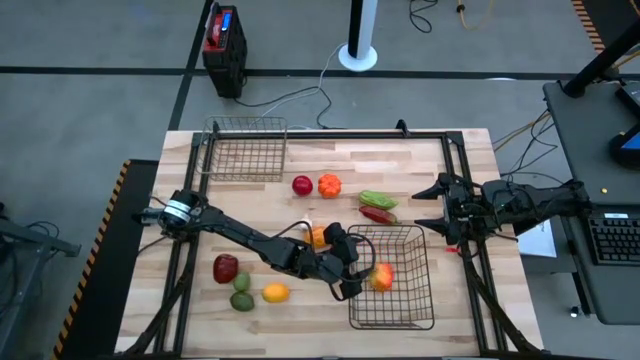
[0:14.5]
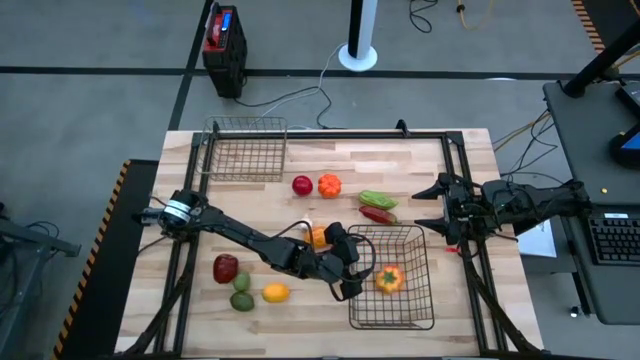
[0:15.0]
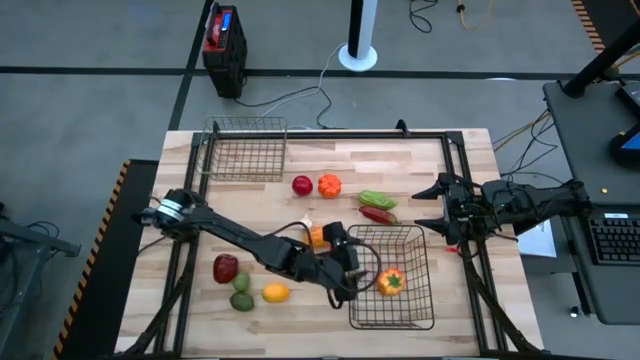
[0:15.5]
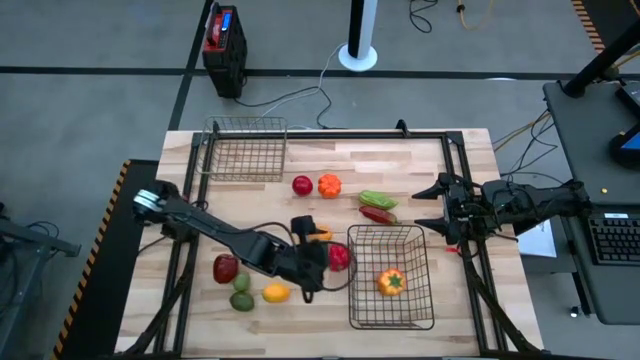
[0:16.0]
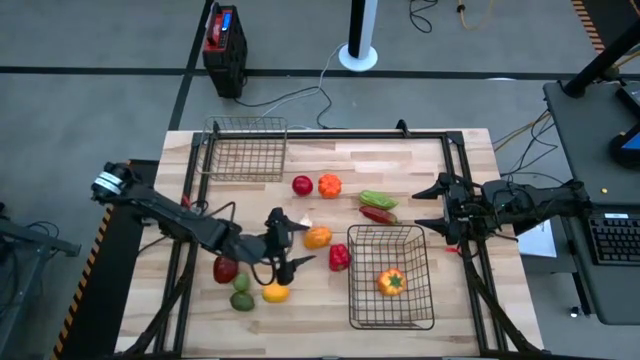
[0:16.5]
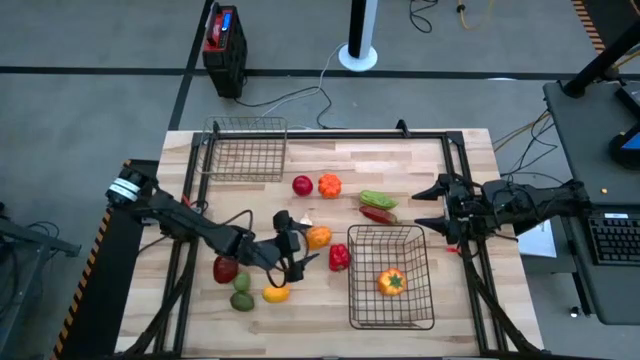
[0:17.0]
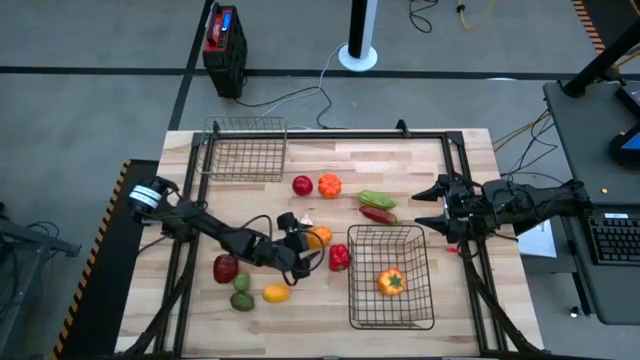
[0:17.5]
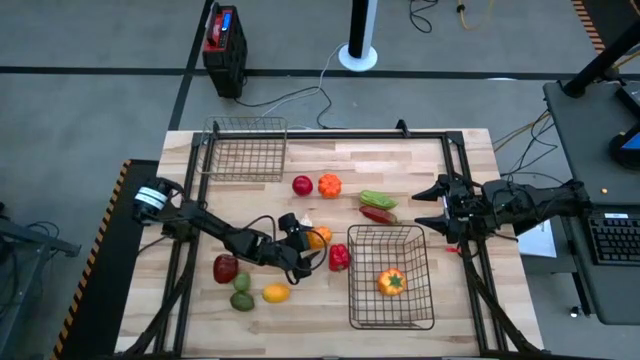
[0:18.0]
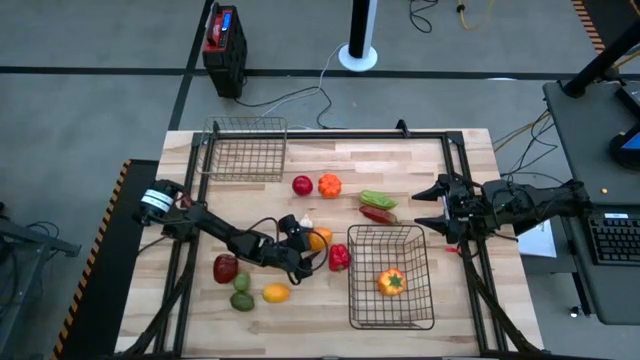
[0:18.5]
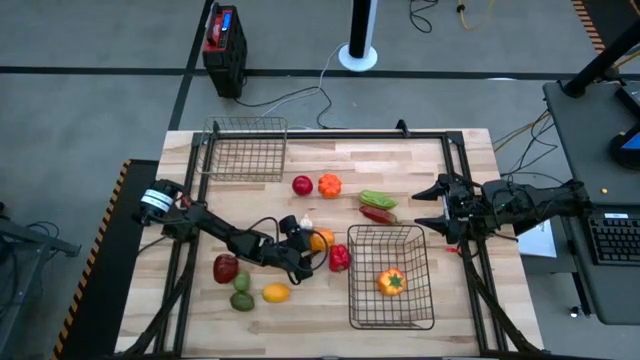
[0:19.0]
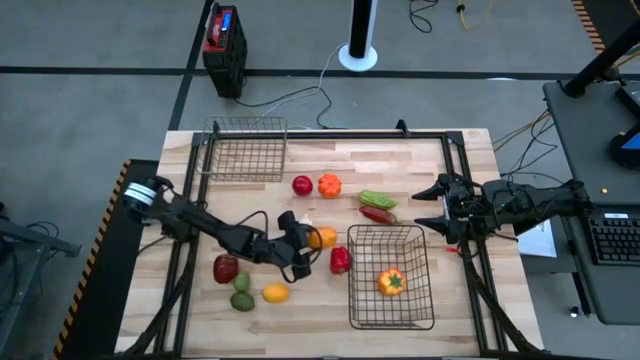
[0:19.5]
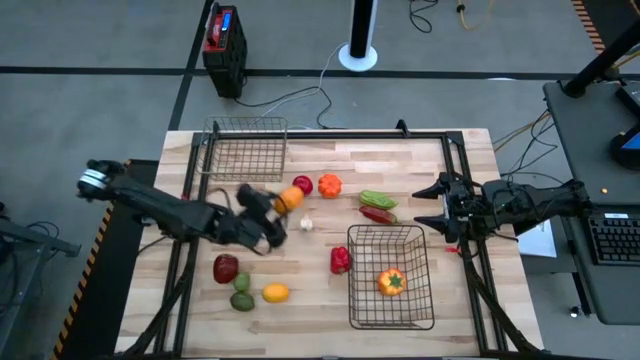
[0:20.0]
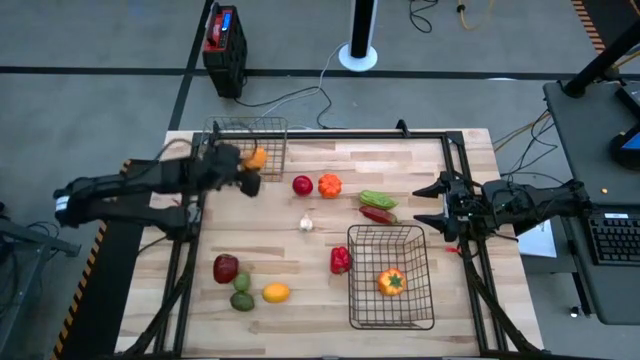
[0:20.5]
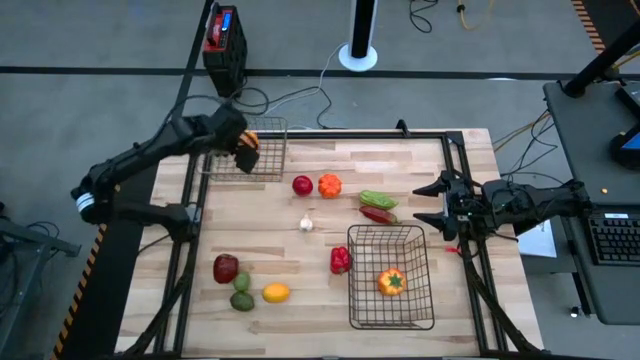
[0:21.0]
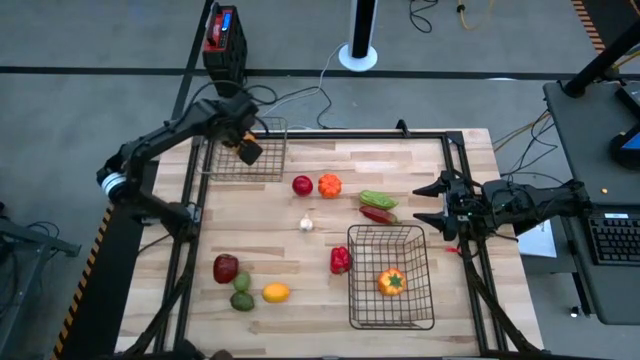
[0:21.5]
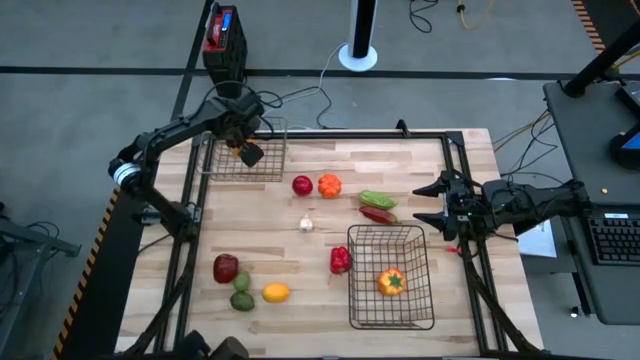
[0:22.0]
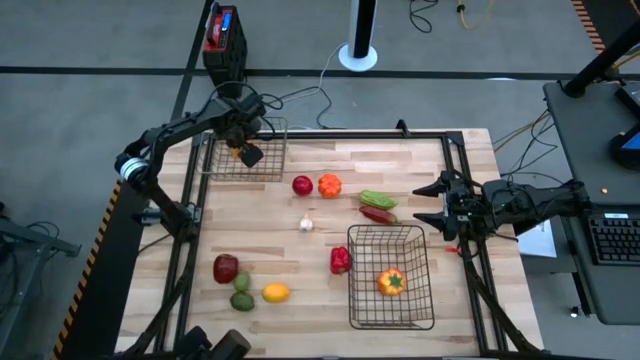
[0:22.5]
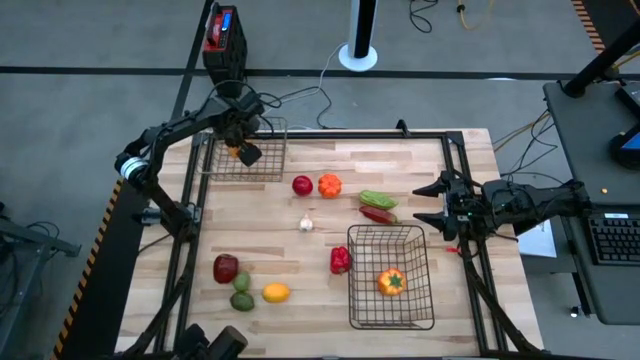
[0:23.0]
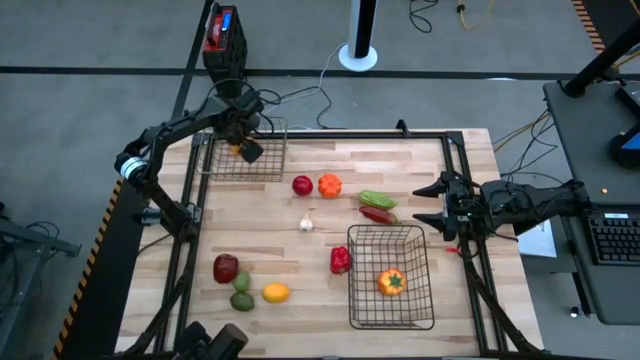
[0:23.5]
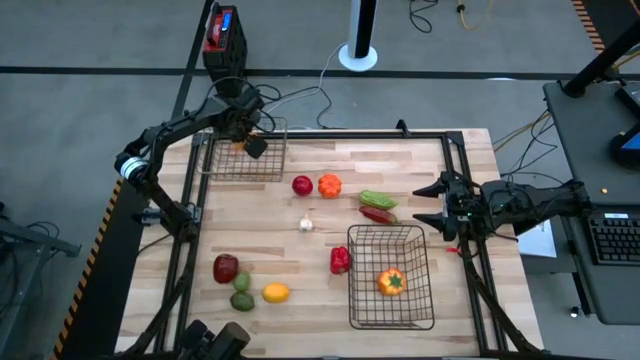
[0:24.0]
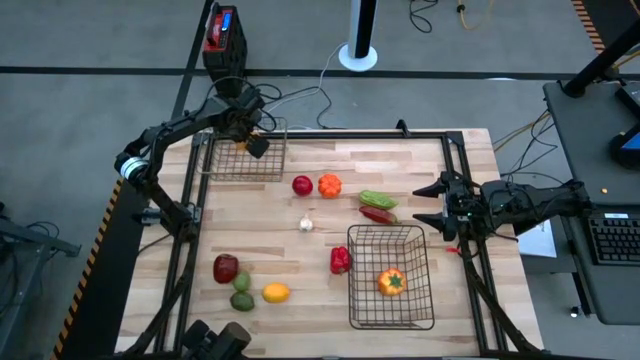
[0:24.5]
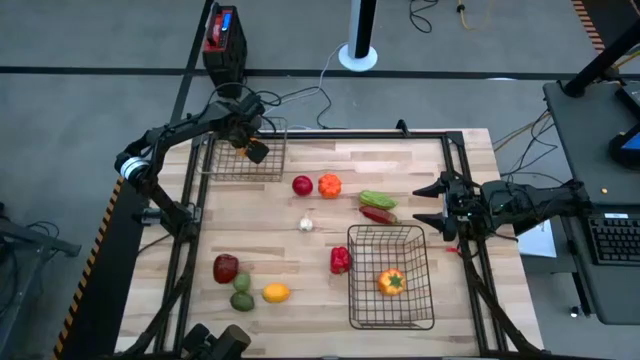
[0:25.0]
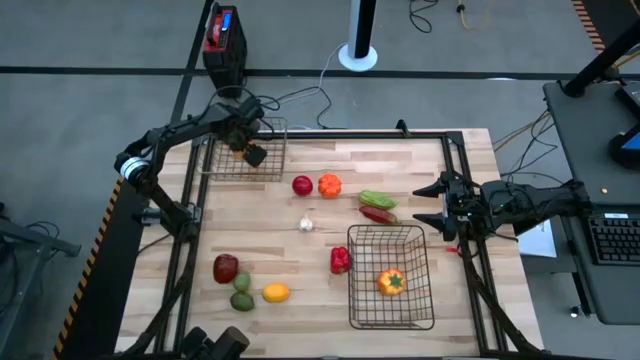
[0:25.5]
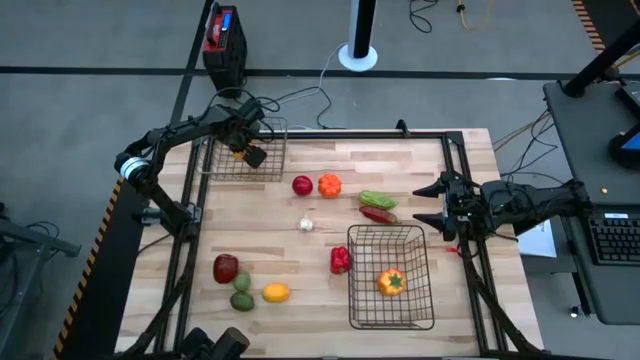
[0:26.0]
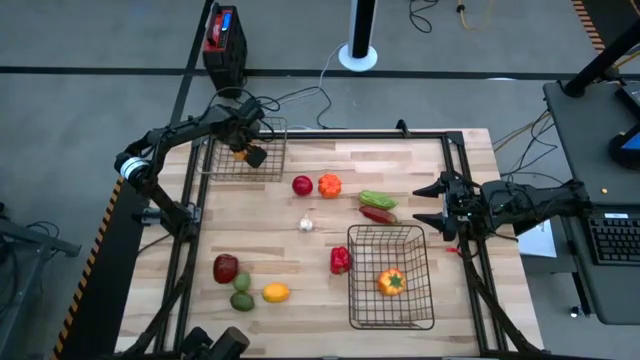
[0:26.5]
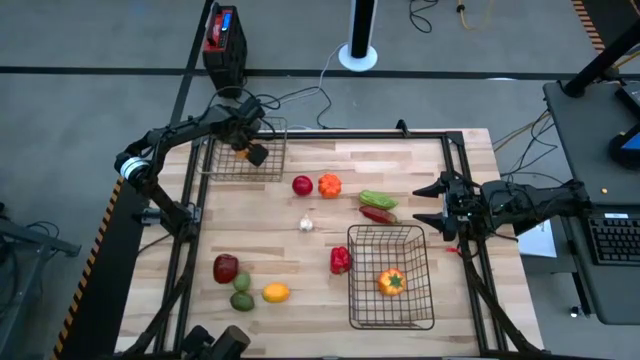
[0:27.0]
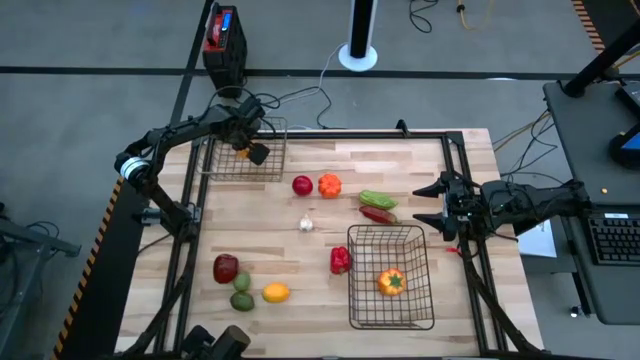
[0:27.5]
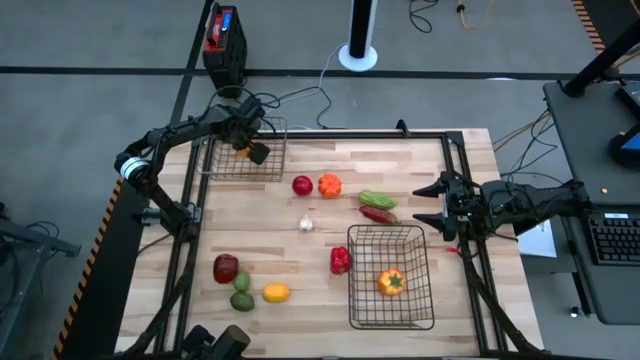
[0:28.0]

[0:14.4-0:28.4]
Task: Sort produce into baskets
Put the yellow potato into the gold wire basket

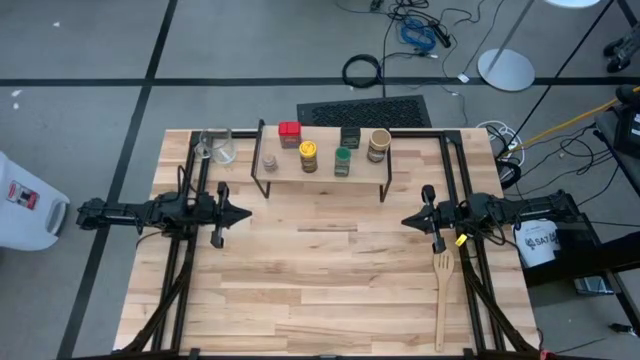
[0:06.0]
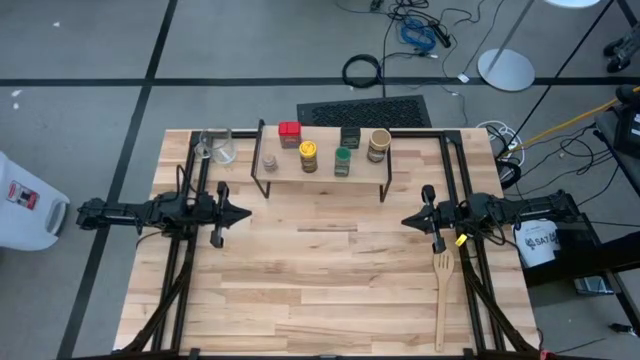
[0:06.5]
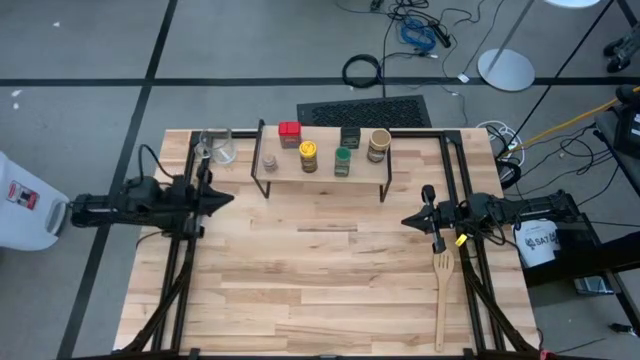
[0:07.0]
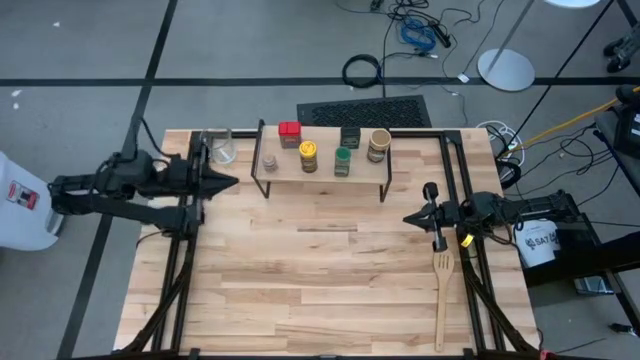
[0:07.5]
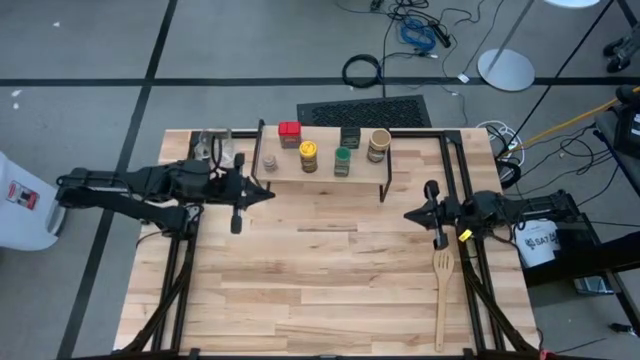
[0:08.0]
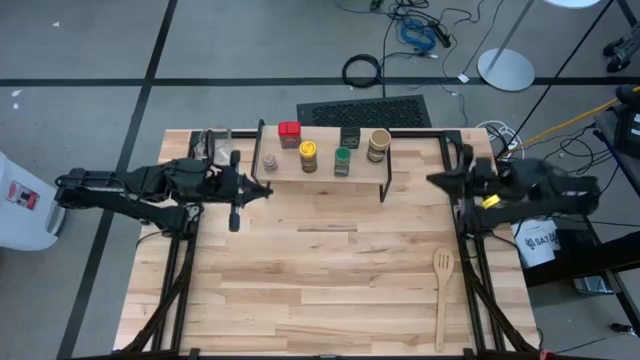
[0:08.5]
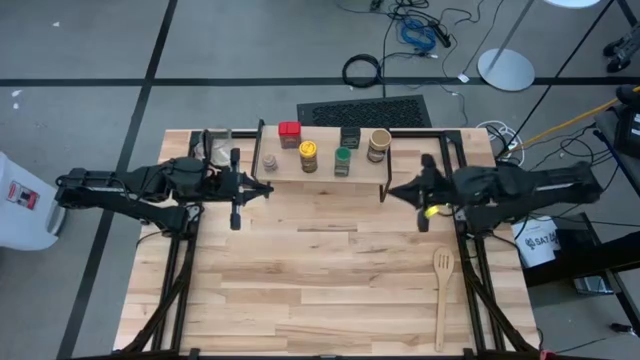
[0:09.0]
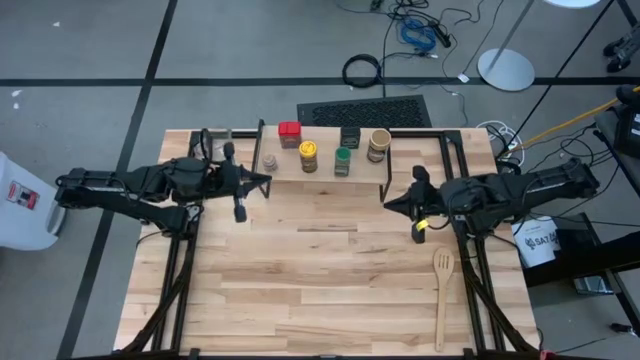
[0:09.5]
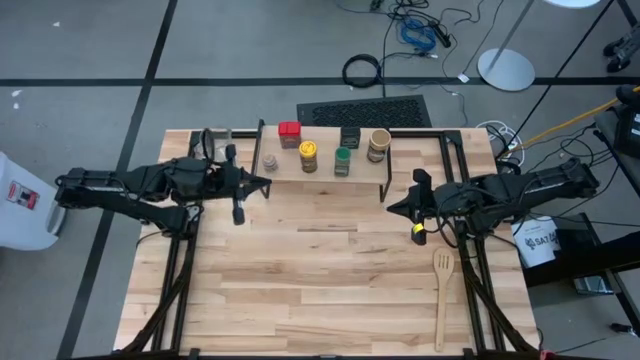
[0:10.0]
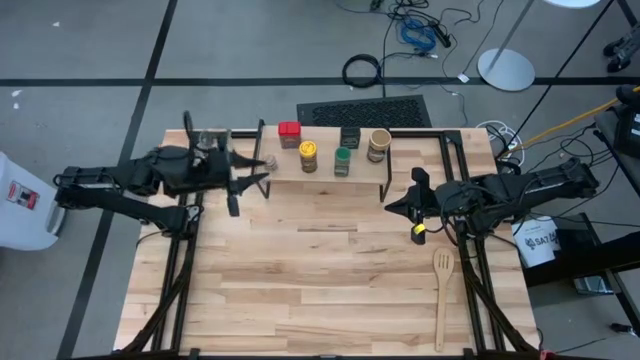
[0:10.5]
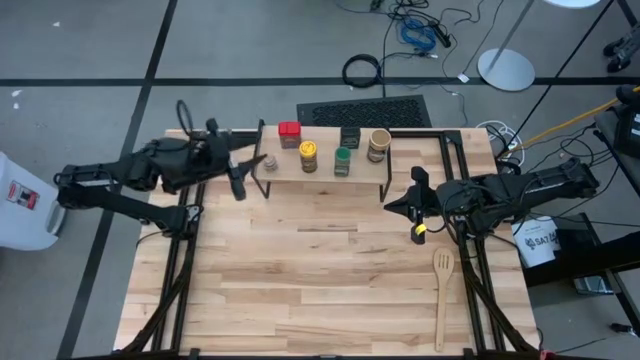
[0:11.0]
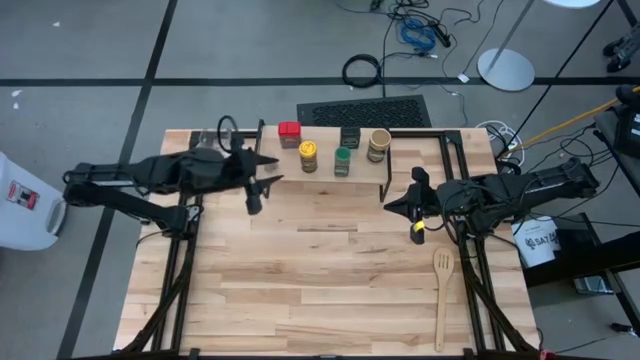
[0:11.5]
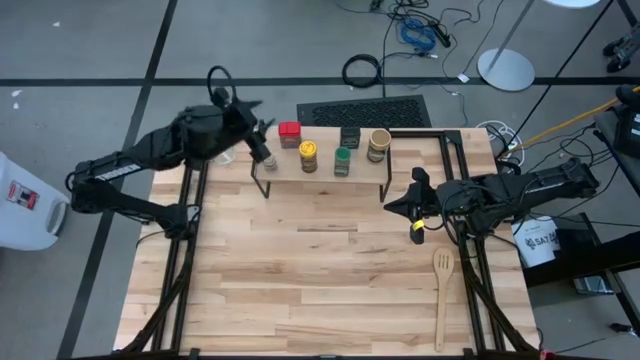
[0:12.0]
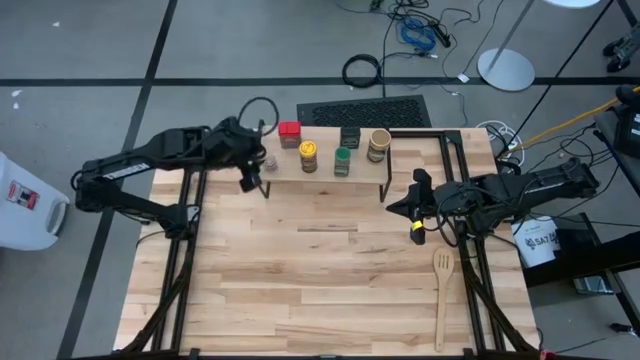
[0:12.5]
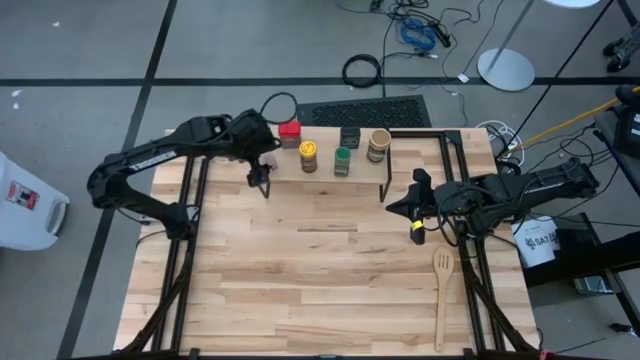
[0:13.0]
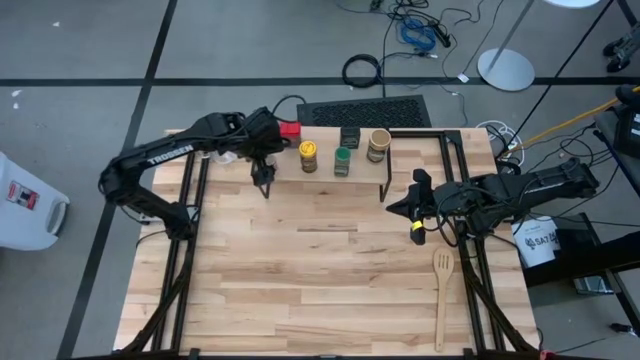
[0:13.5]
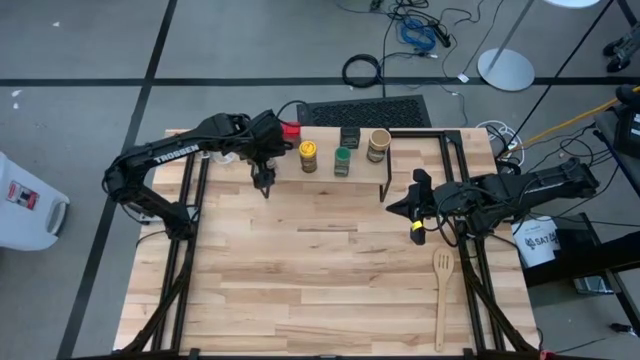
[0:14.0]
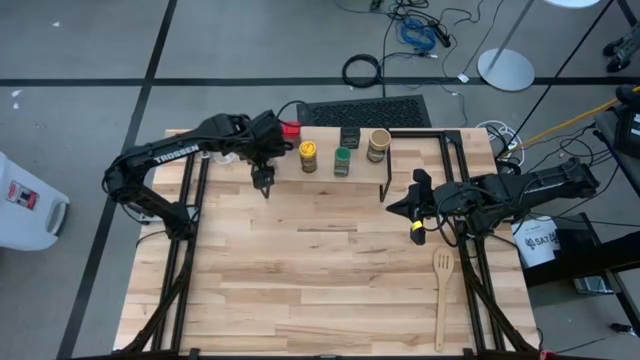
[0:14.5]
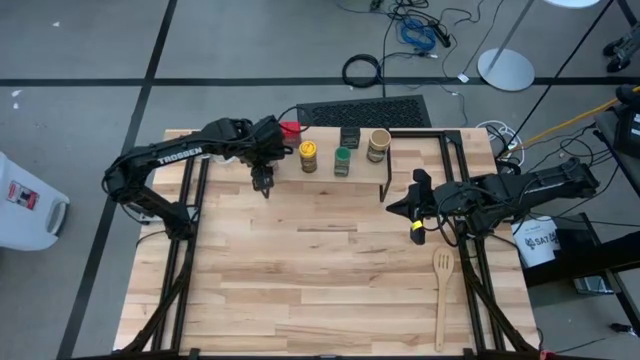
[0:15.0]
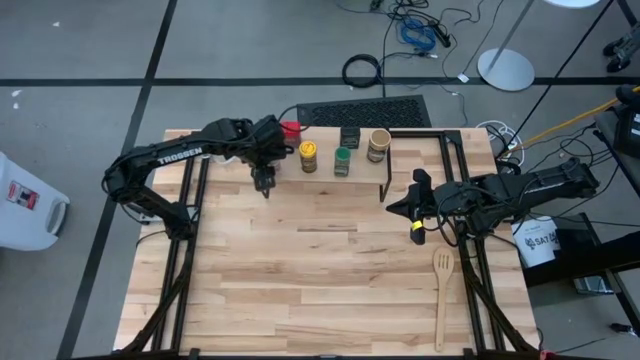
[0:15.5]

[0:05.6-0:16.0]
Task: Shelf spices
Remove the brown seasoning bottle from the shelf
